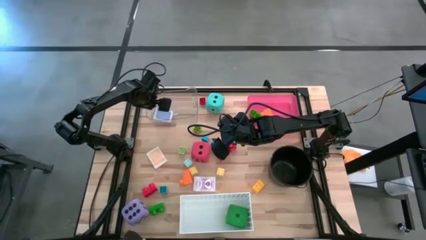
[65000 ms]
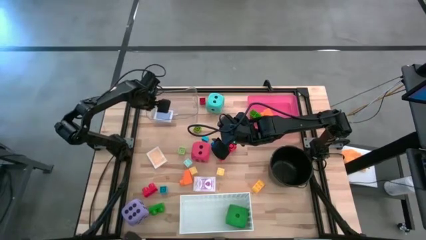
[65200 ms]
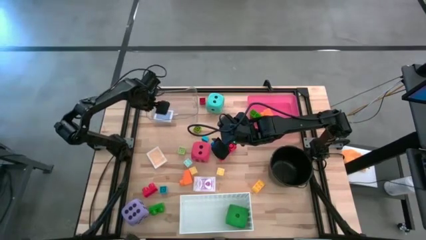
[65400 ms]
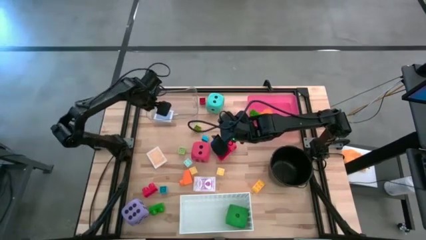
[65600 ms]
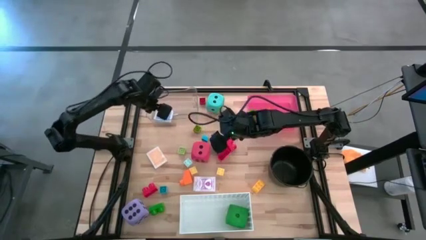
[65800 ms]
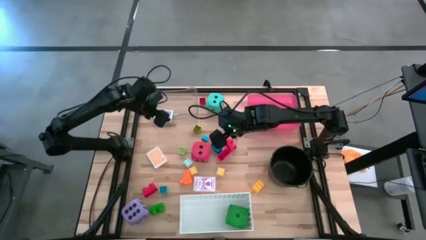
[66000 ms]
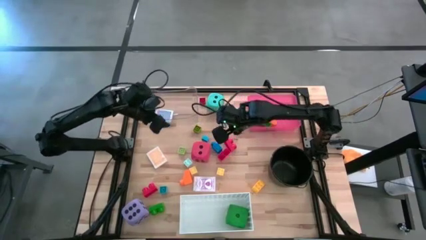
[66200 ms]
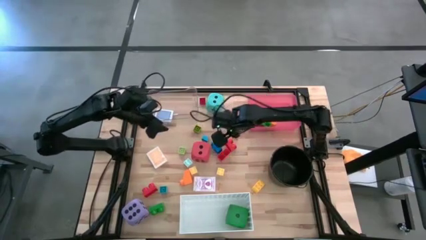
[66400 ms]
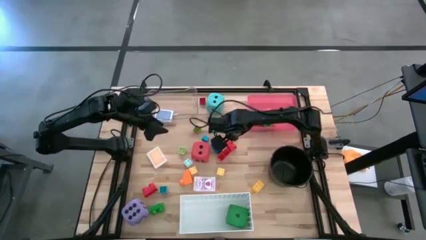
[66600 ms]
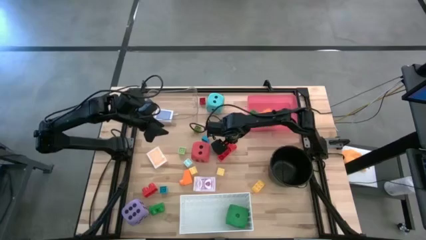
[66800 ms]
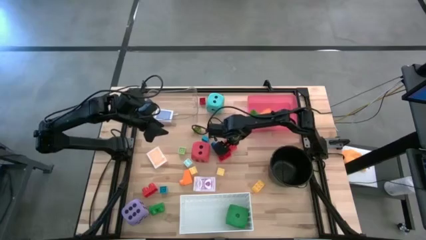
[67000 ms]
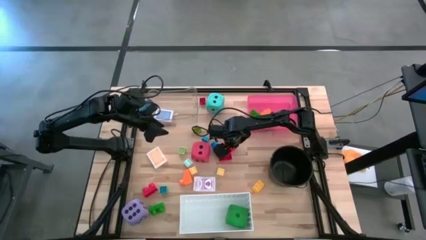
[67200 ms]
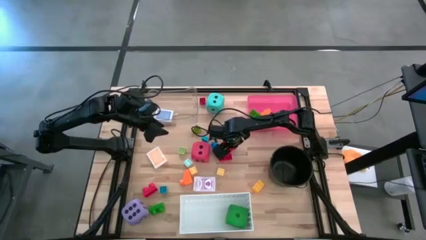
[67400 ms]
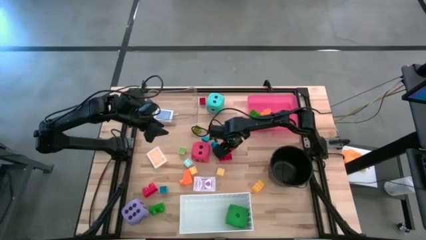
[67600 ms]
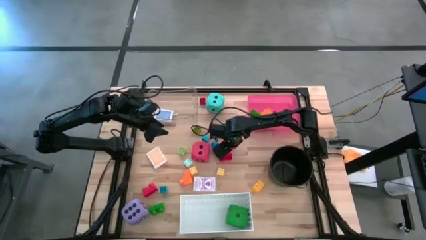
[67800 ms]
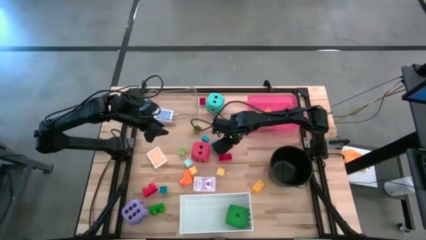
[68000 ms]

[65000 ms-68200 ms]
Task: Pick & Place Toys
Put the red game piece into the red bin

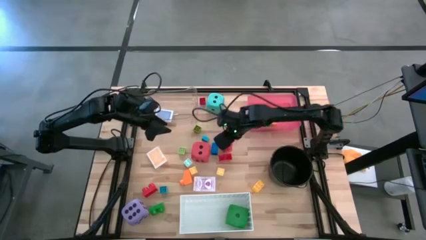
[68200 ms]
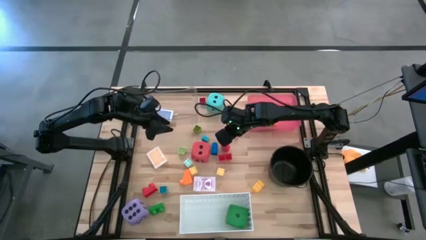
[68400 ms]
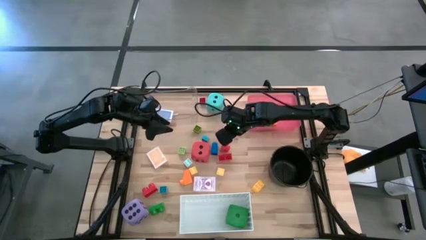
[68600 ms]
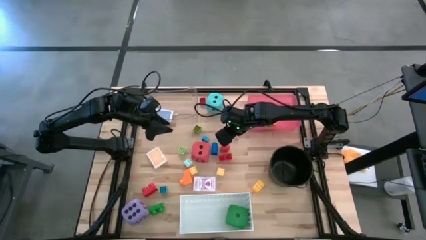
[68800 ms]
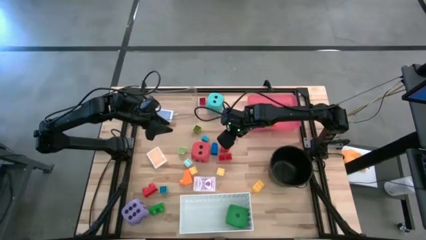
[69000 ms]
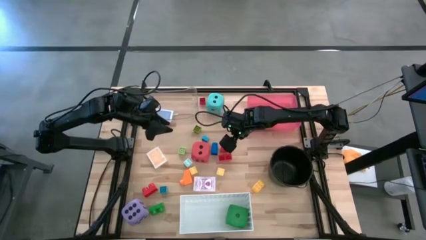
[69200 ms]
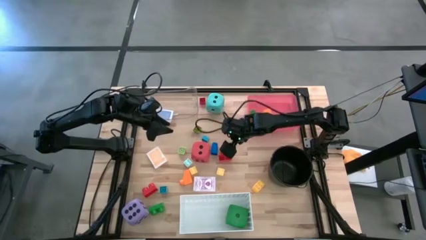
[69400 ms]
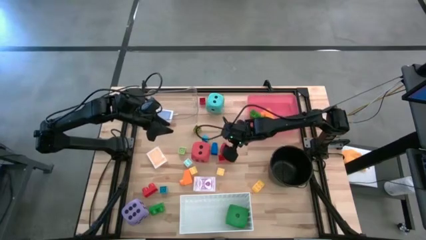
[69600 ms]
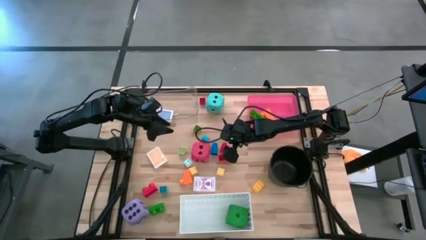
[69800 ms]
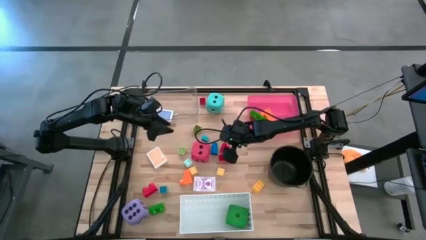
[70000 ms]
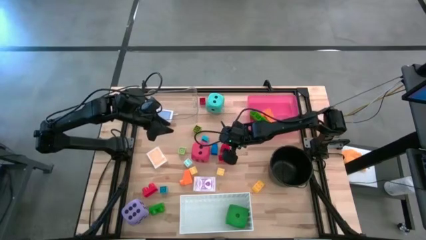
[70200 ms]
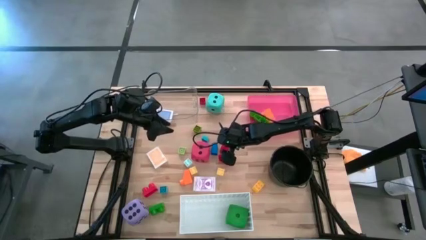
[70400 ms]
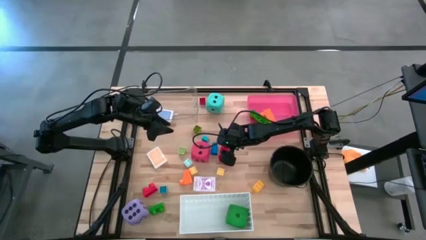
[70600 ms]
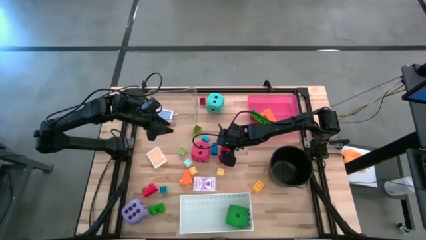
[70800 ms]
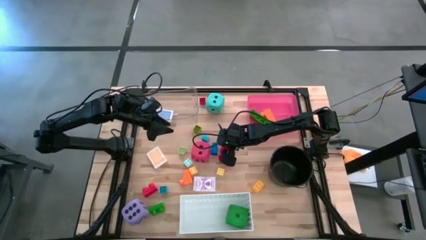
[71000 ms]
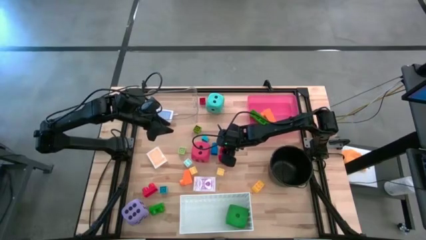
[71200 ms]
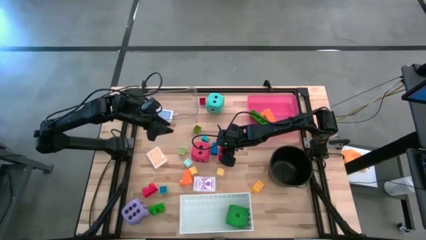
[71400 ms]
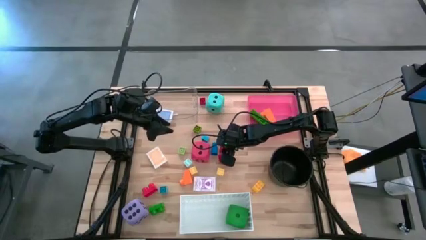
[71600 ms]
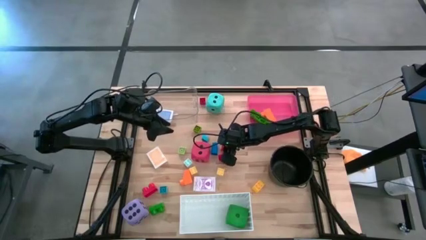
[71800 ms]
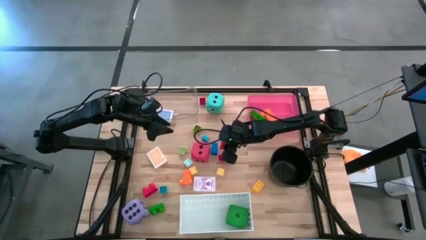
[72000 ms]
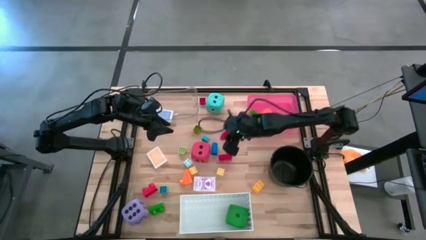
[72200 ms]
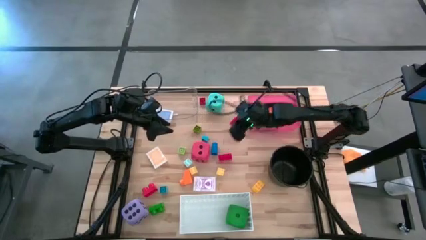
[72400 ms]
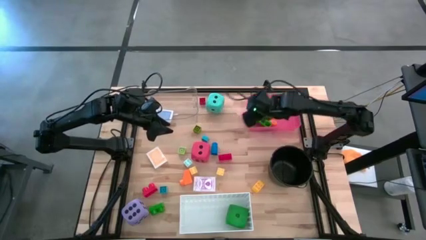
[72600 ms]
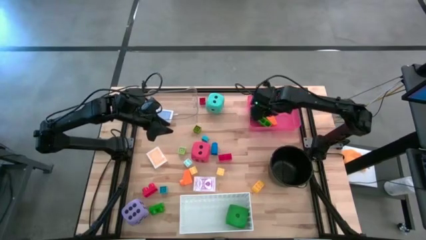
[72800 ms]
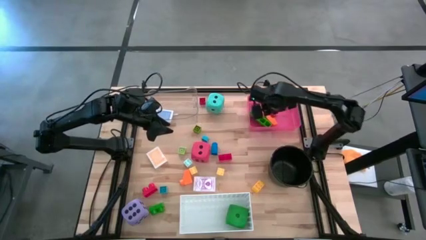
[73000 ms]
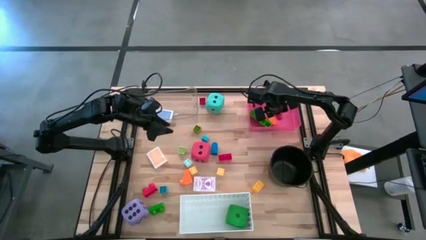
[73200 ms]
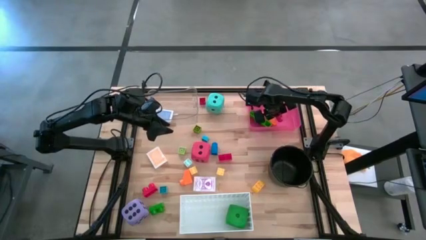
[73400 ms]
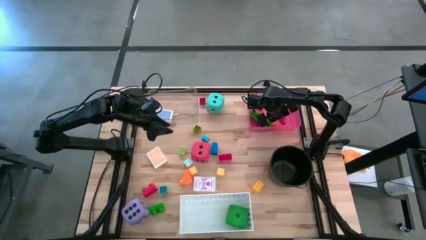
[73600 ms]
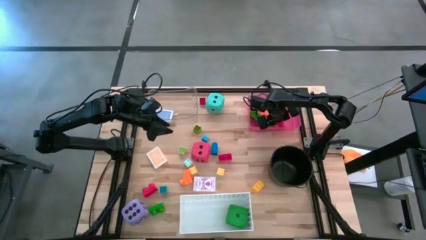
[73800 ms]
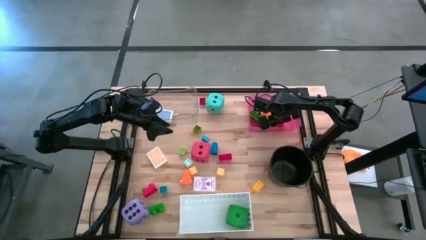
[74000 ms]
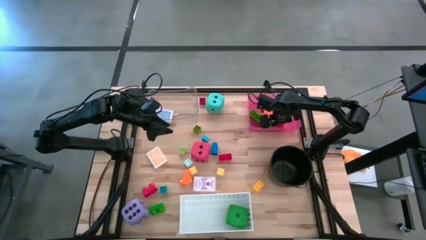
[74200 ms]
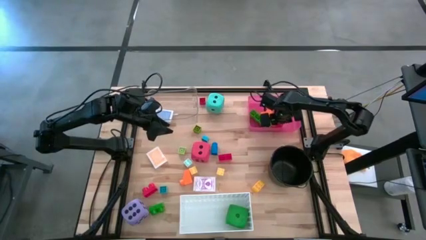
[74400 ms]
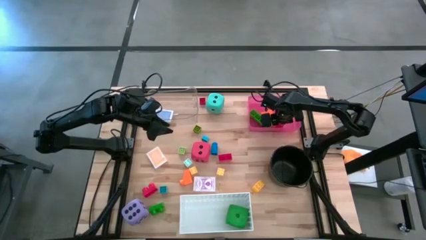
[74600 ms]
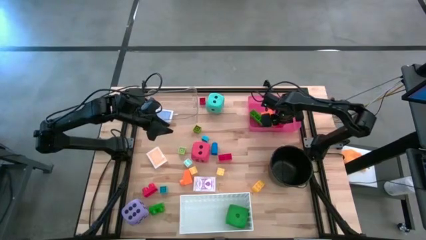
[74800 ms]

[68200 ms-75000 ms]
Put the red game piece into the red bin

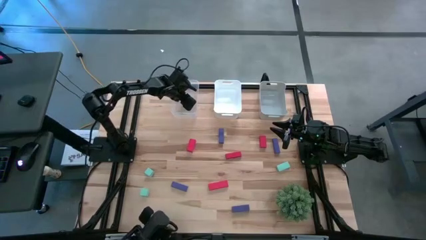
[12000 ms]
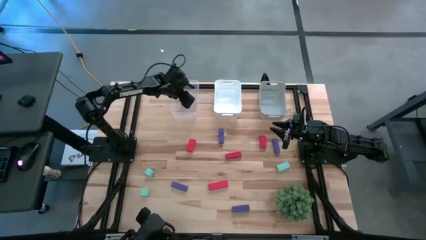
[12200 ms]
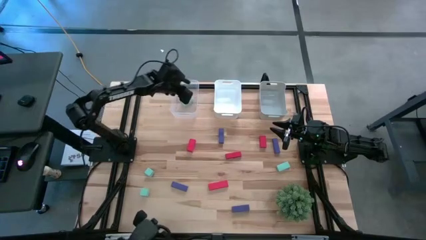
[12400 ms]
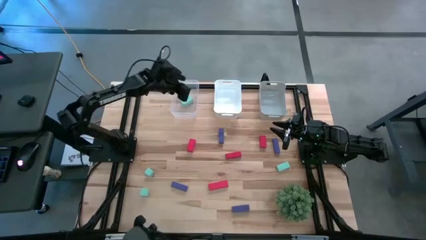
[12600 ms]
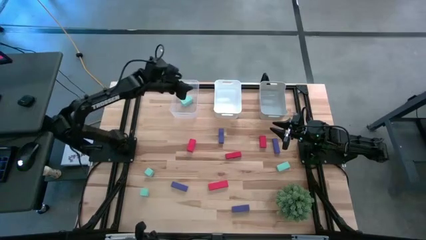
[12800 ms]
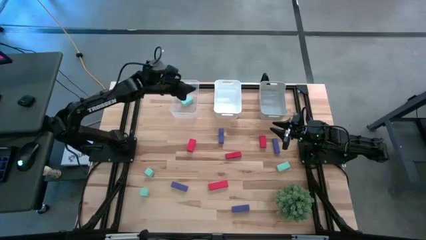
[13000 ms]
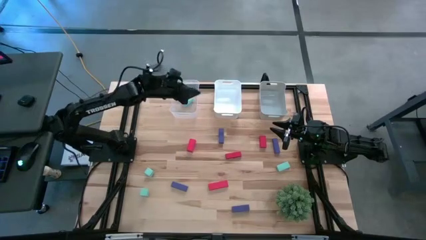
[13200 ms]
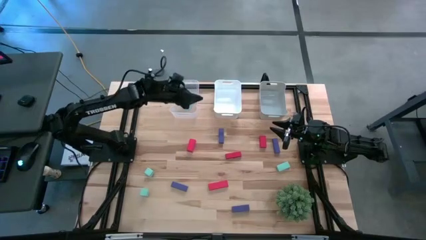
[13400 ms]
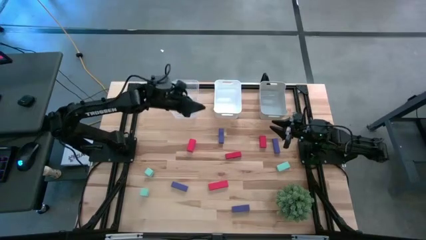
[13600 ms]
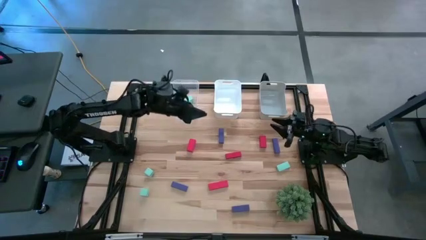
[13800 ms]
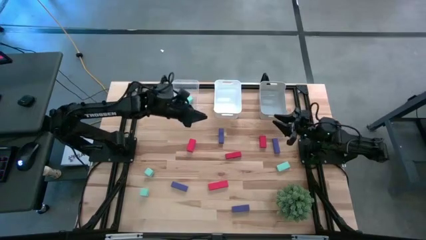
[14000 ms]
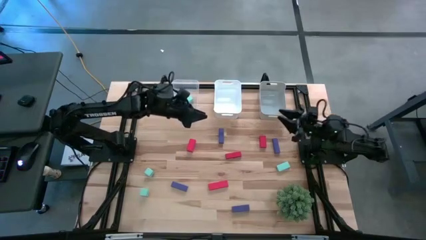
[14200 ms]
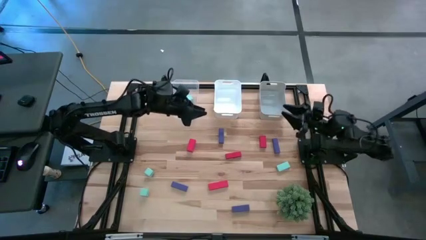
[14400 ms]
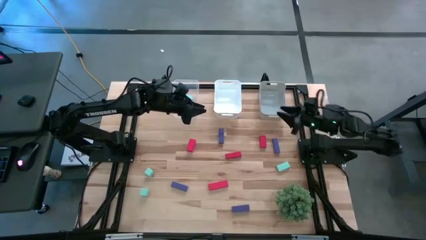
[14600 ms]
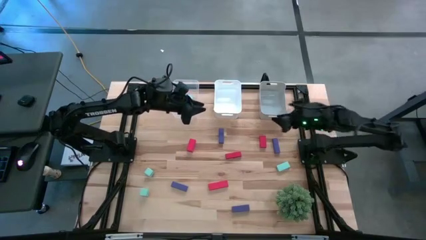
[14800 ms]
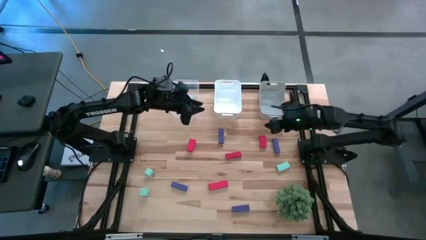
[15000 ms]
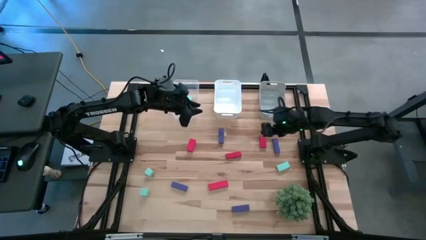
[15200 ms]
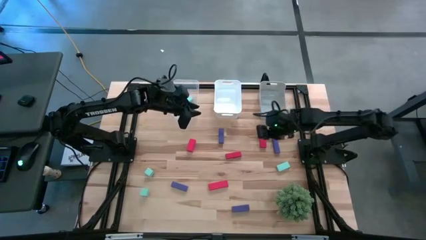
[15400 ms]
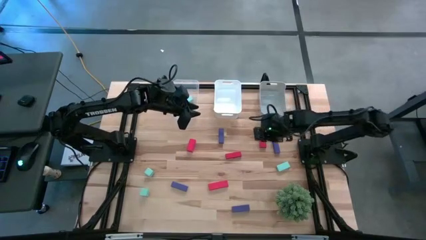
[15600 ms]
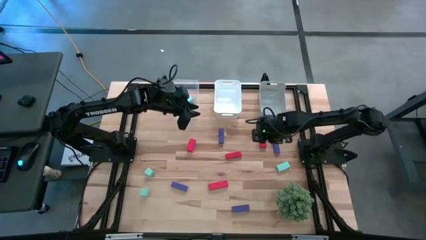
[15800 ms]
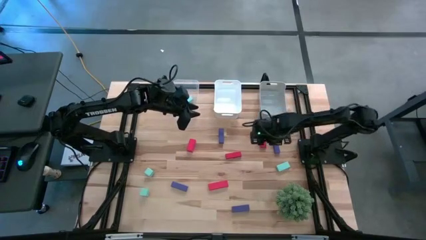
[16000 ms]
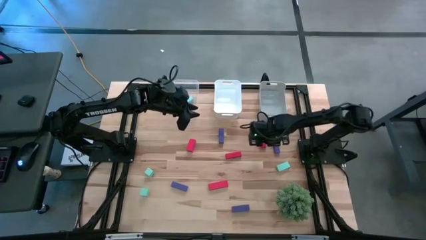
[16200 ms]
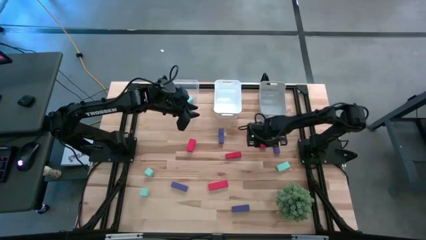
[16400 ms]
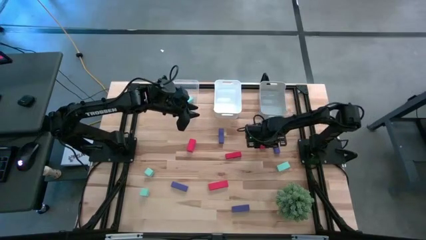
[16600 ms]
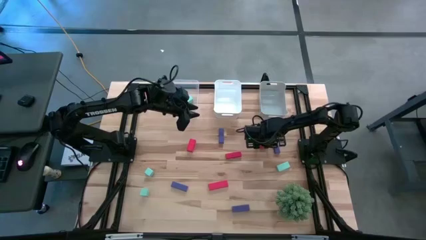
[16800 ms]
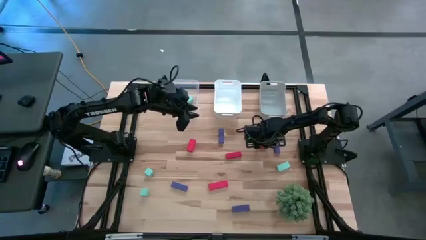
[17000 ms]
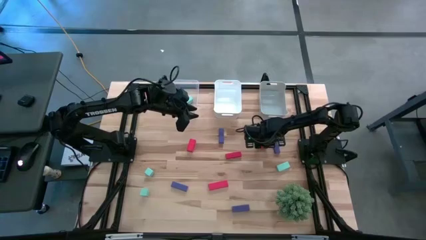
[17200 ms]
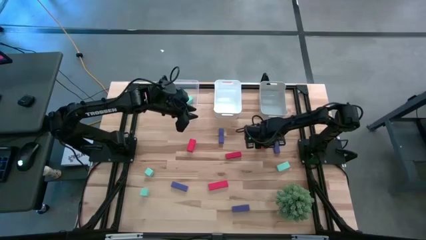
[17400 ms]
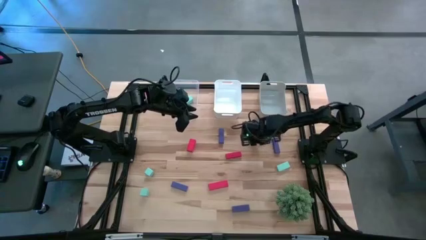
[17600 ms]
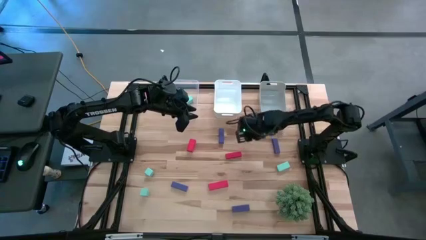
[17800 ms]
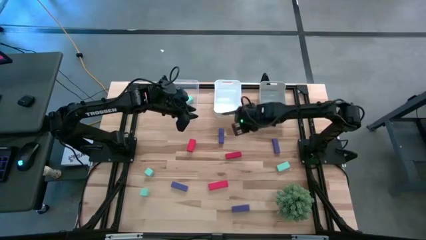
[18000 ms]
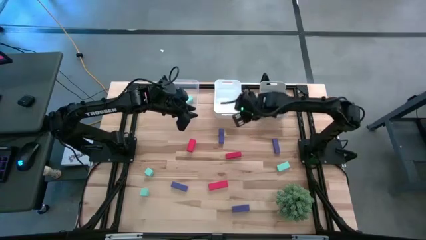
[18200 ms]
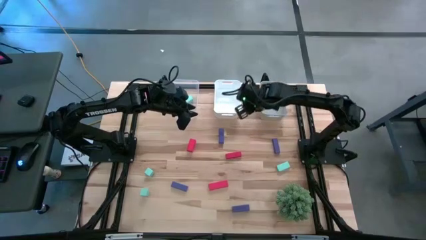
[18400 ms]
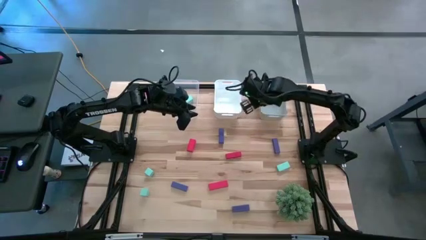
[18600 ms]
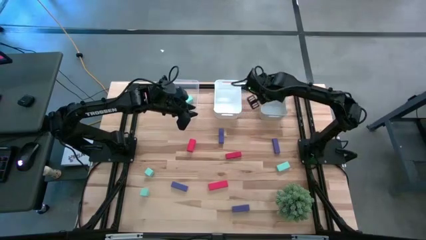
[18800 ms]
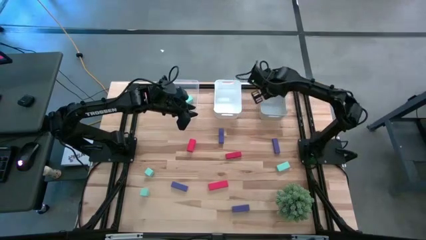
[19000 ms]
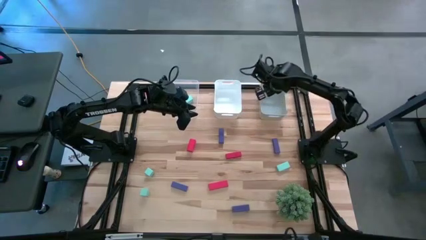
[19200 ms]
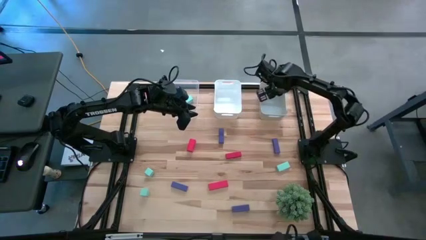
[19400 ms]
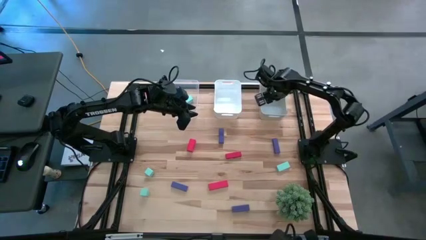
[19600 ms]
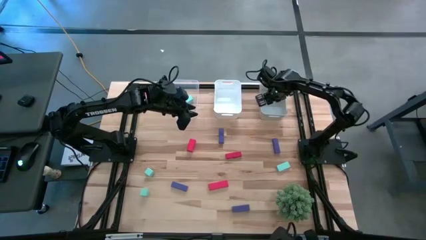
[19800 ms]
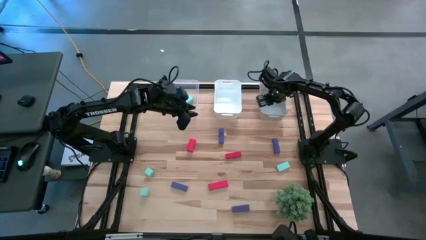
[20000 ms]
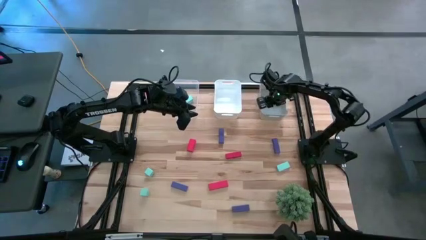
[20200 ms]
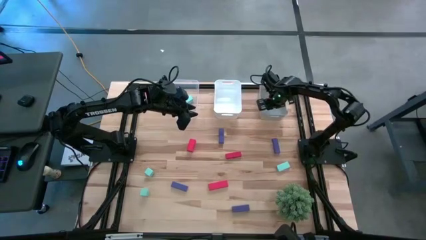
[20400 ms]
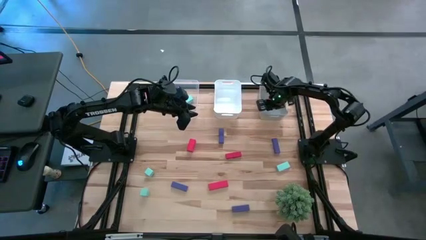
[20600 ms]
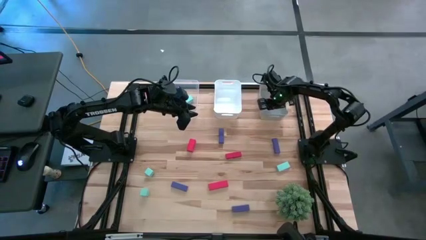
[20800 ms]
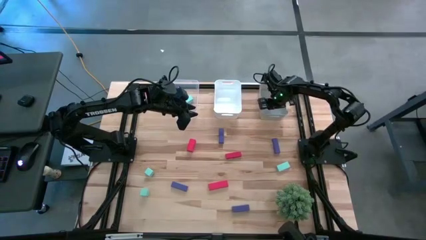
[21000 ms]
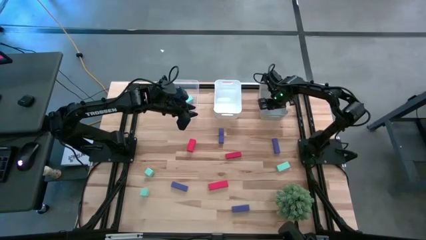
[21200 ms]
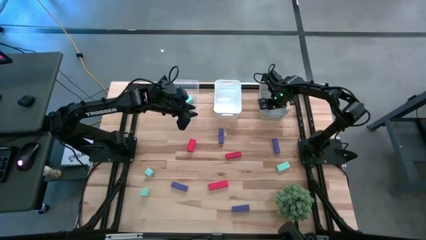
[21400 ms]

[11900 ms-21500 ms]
Task: Sort & place blocks by color
Put the red block into the gray bin
